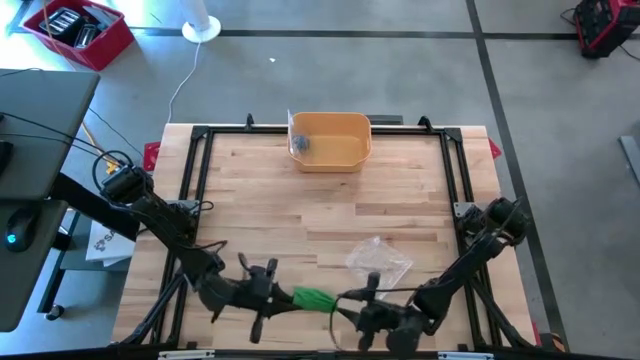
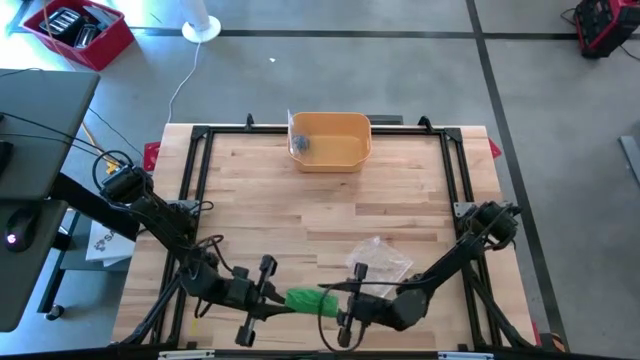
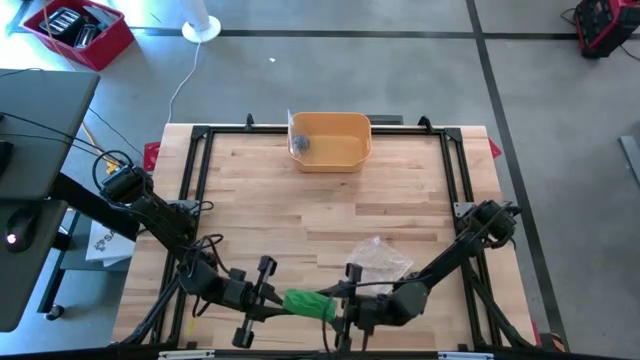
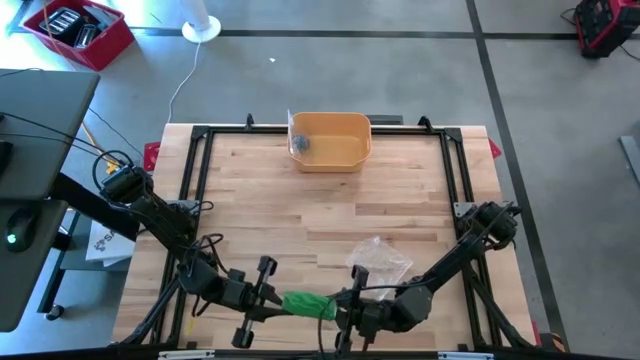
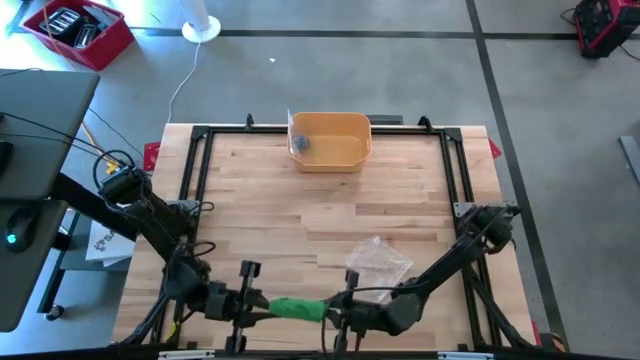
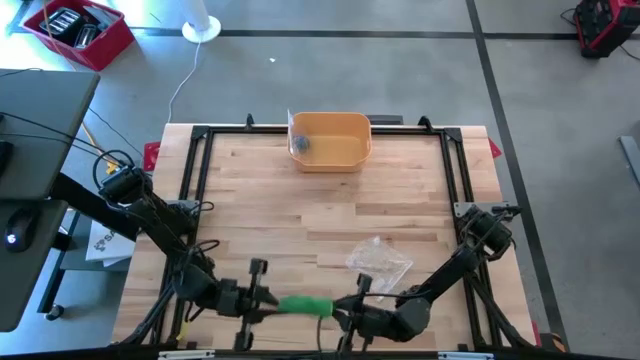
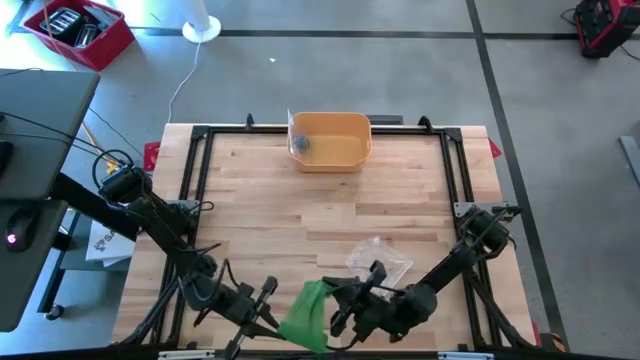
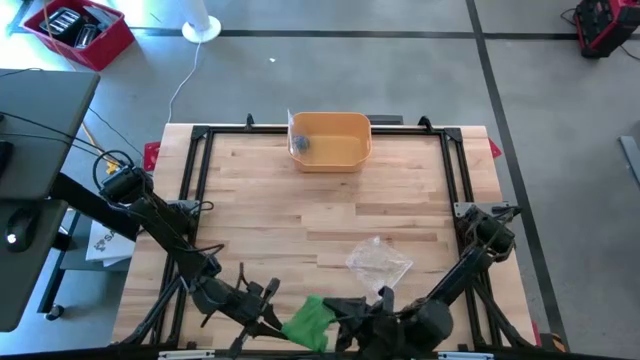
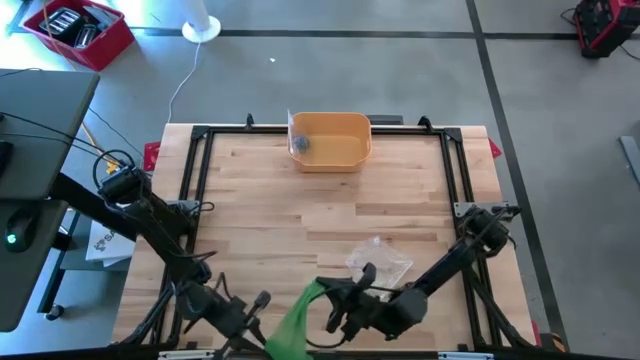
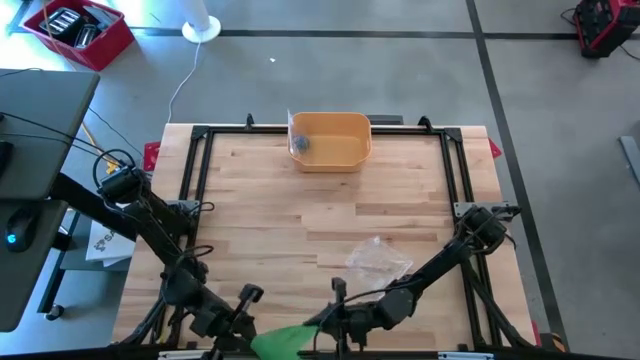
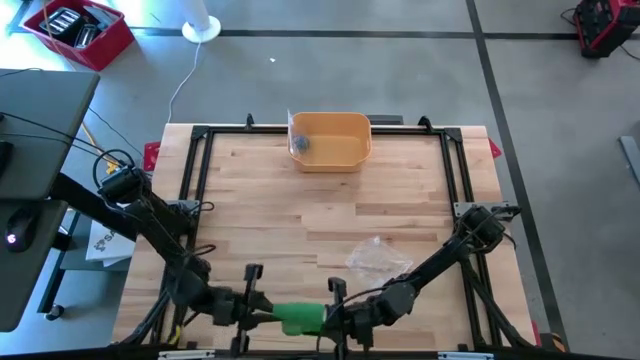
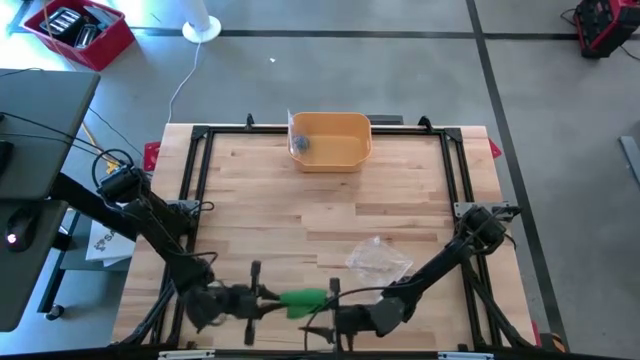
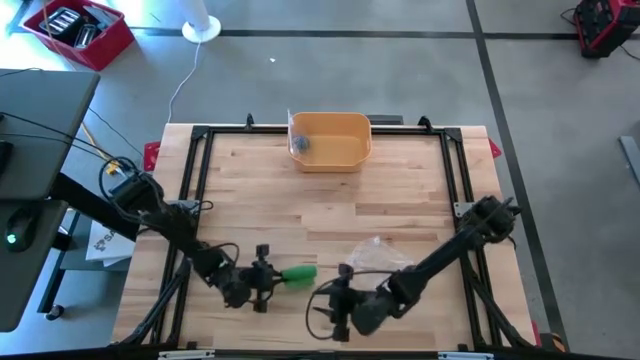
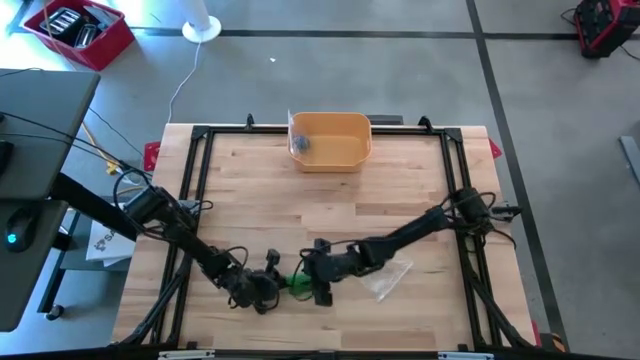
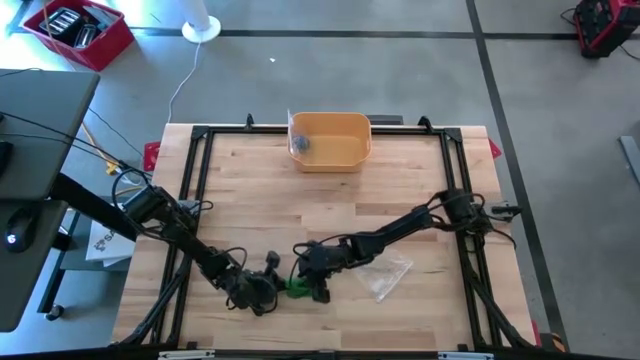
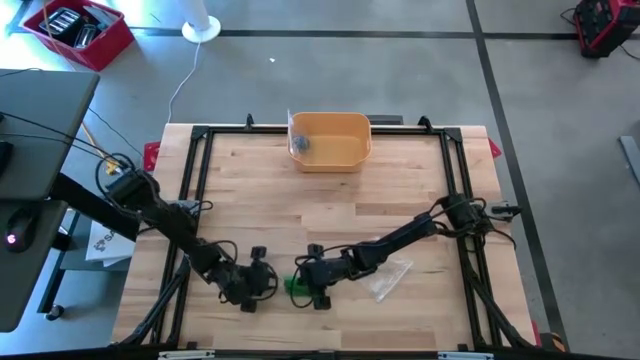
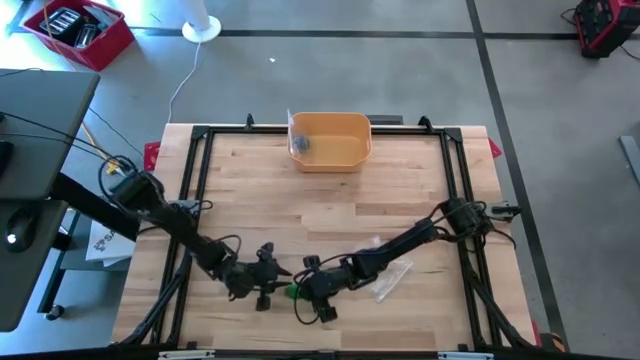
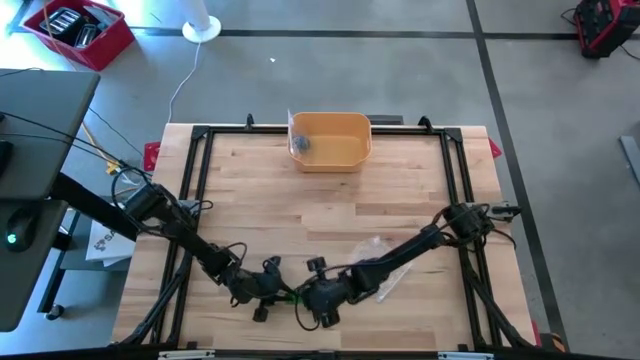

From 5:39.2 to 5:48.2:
Task: Roll bandage
Roll the green bandage

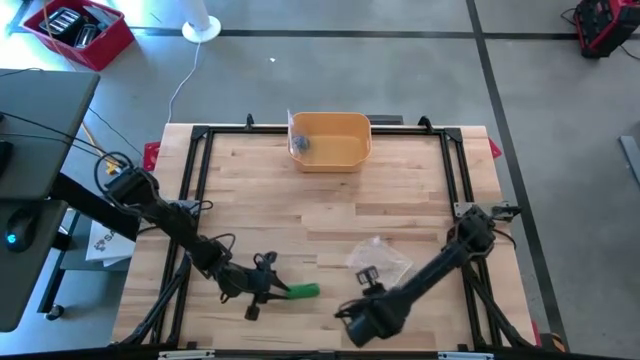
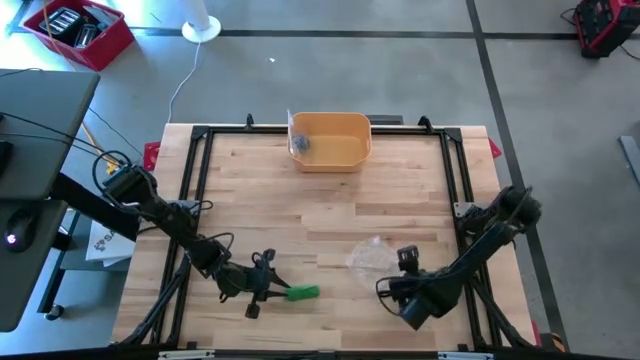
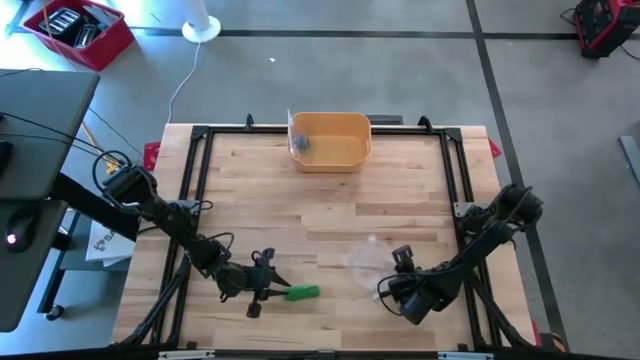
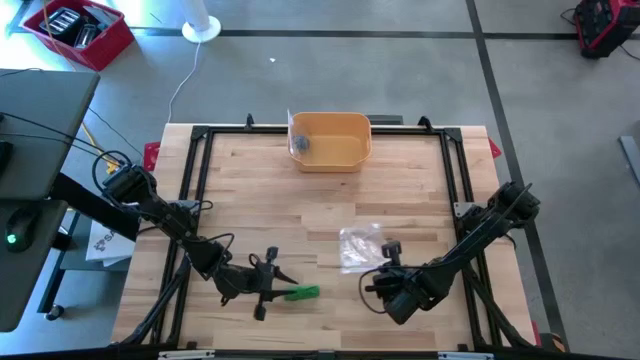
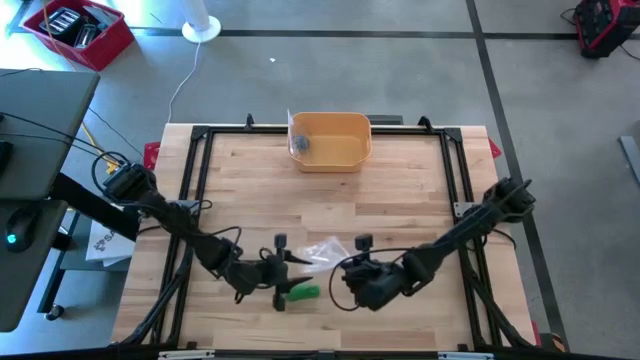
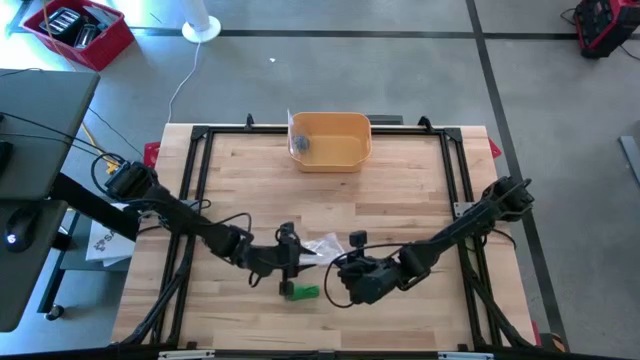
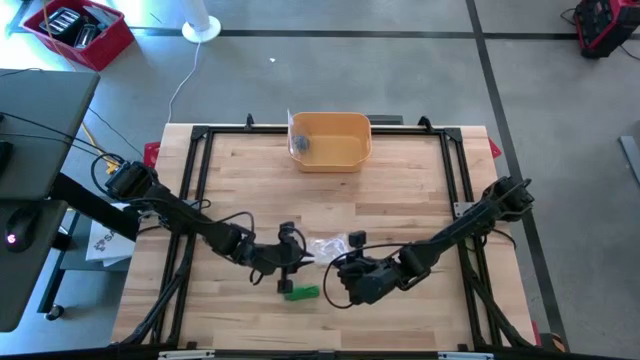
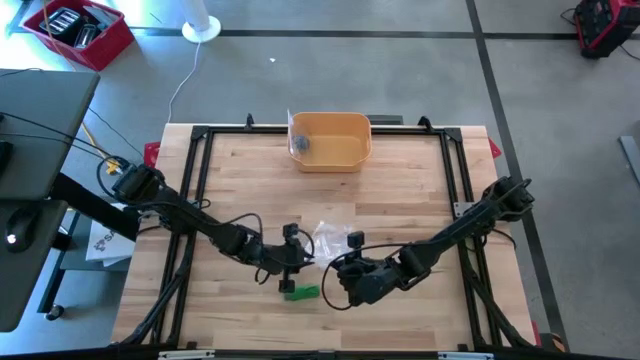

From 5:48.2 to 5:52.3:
Put the rolled green bandage into the transparent zip bag

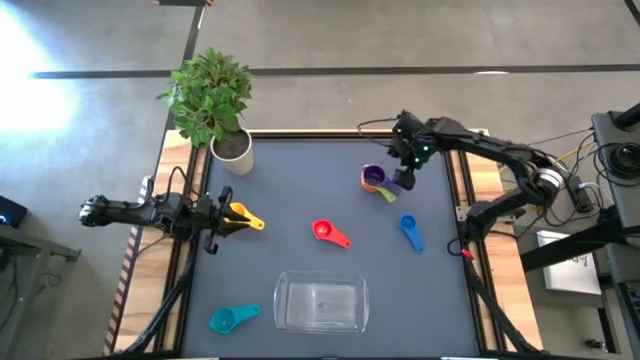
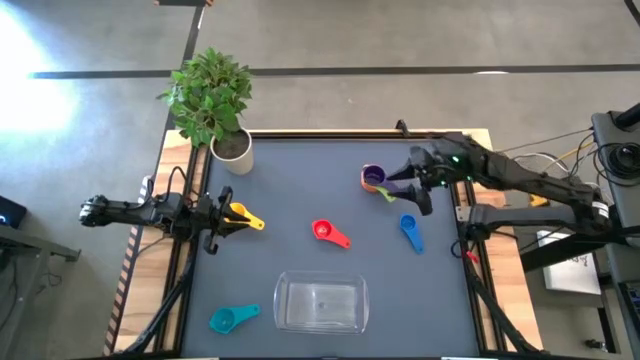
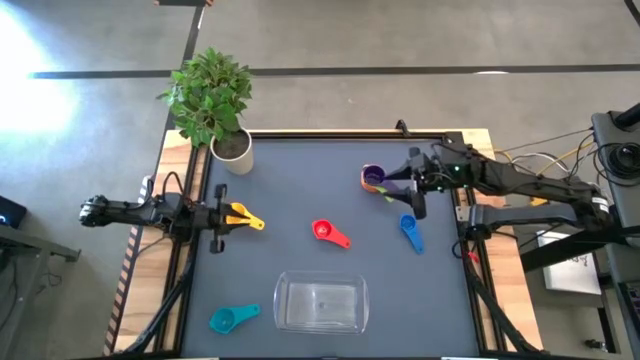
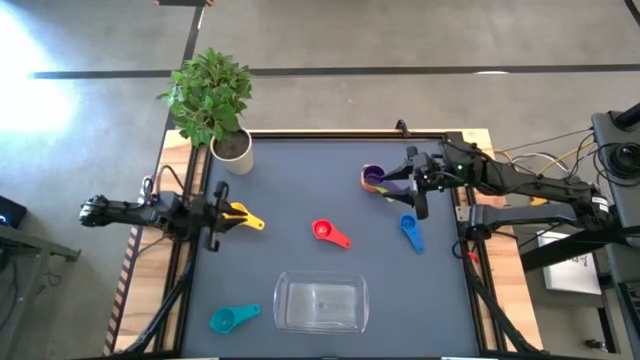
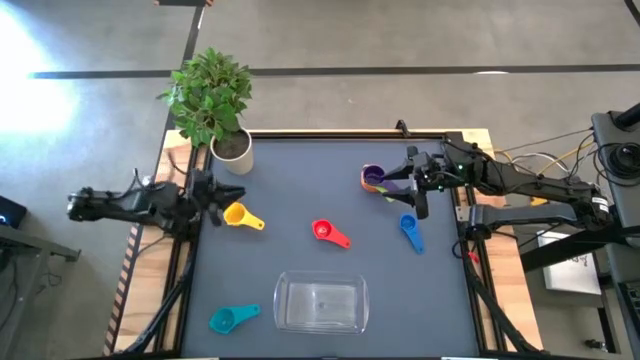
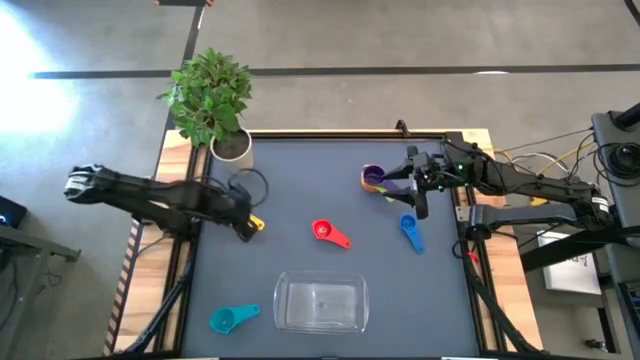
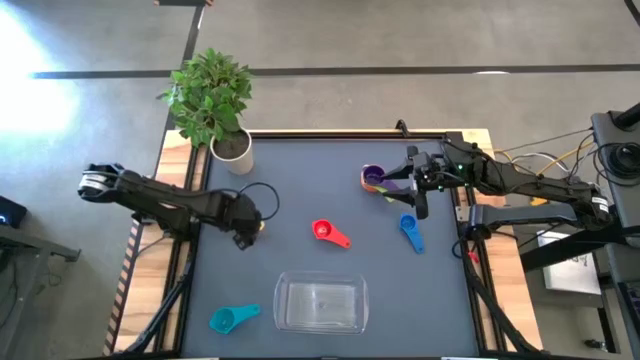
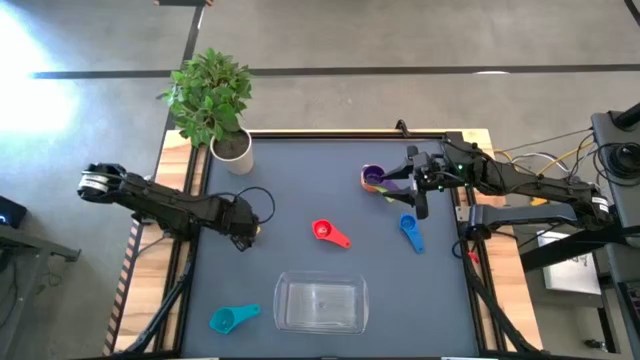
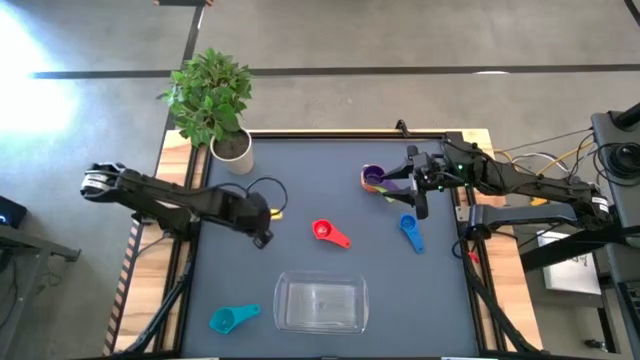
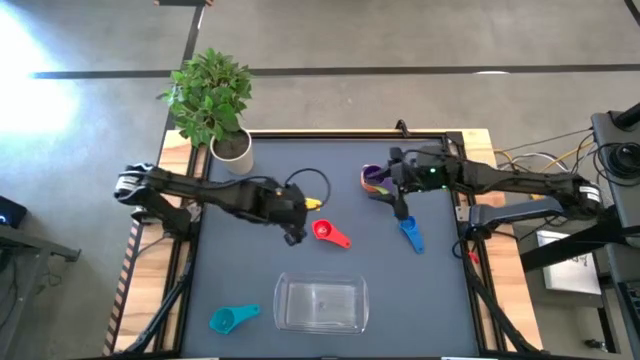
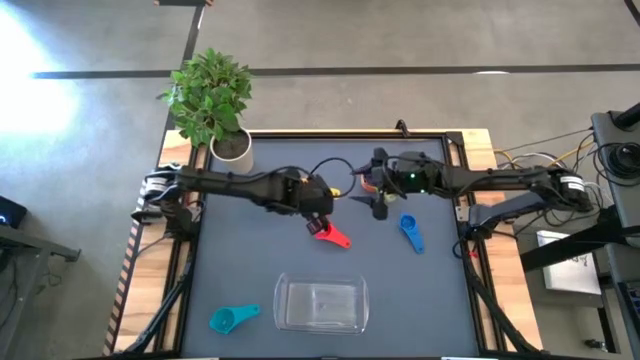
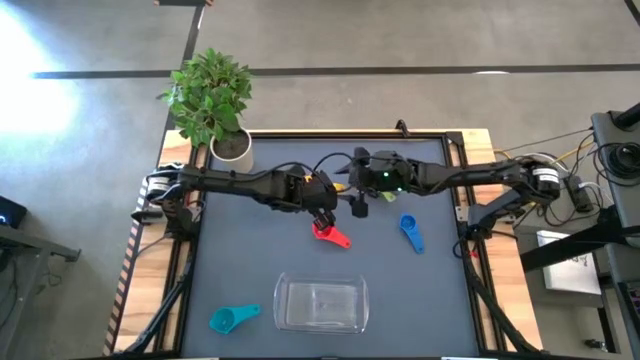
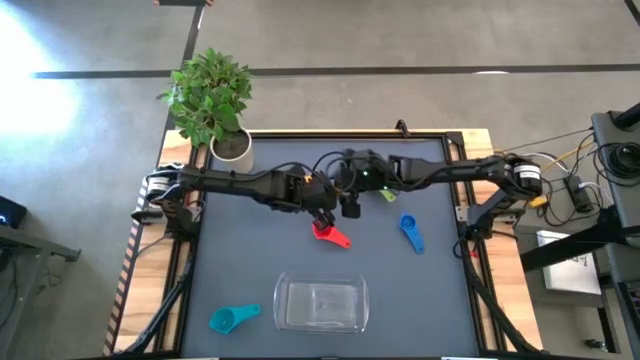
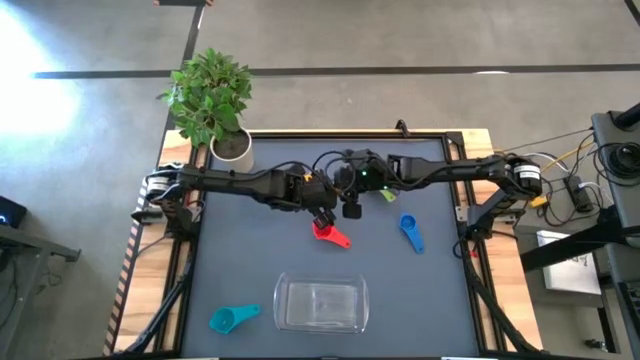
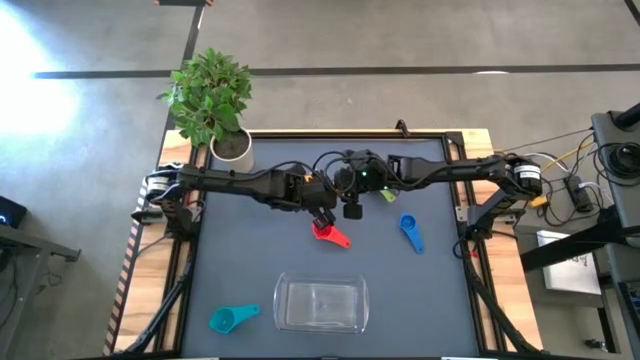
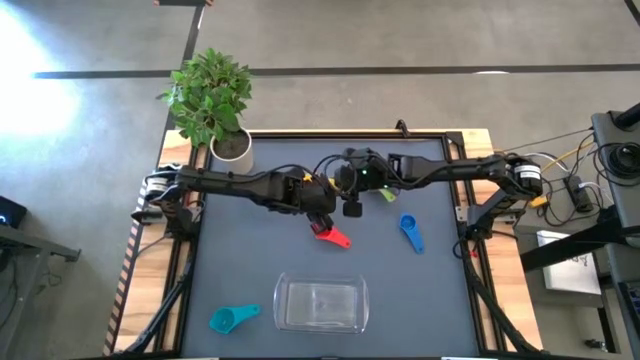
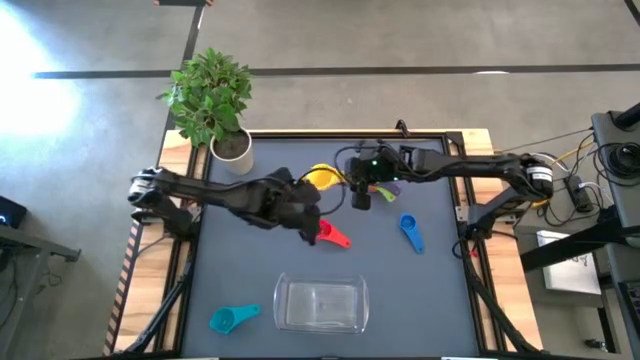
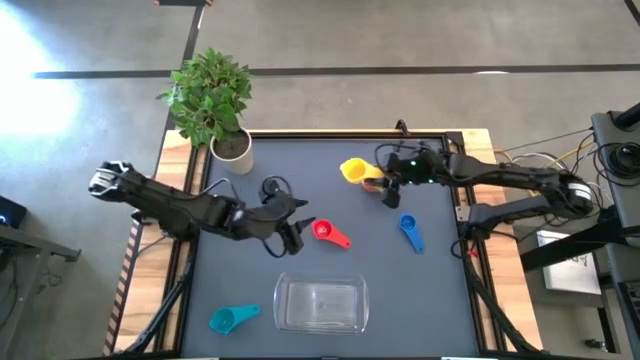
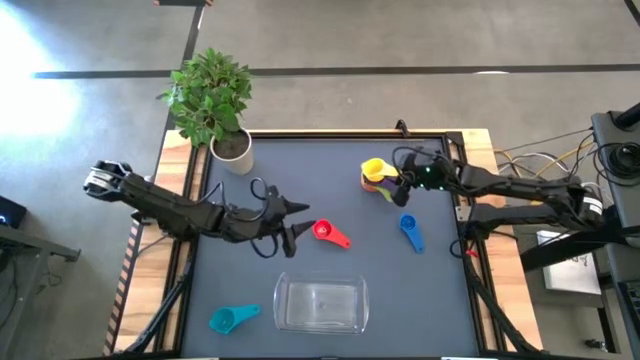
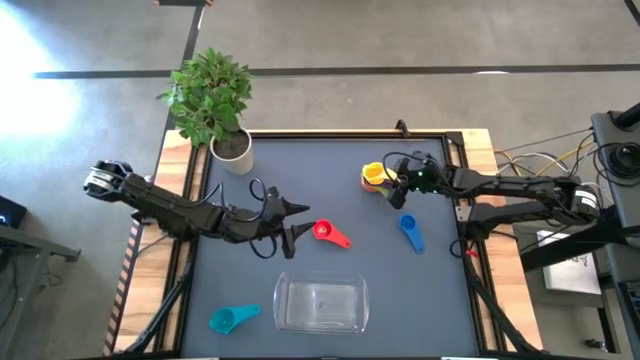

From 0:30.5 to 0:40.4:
Task: Nest measuring cups in basket
Stack the yellow measuring cup on top of the violet measuring cup
